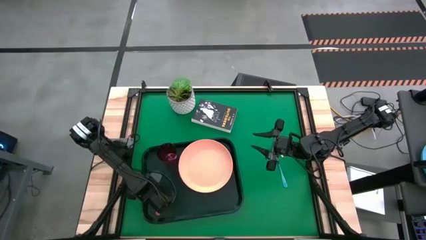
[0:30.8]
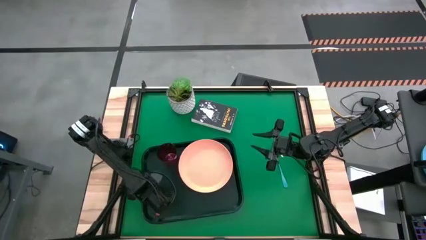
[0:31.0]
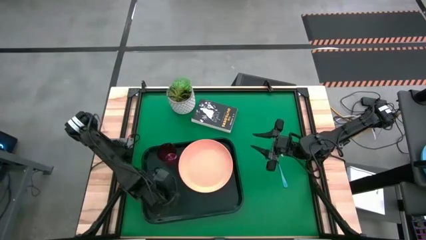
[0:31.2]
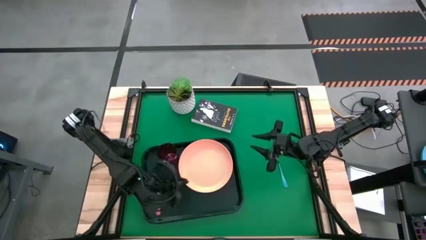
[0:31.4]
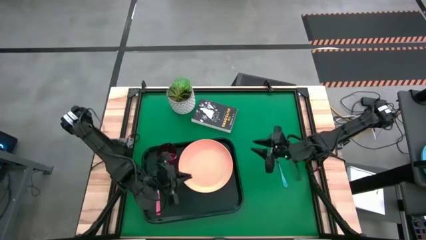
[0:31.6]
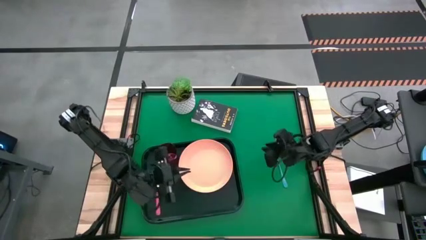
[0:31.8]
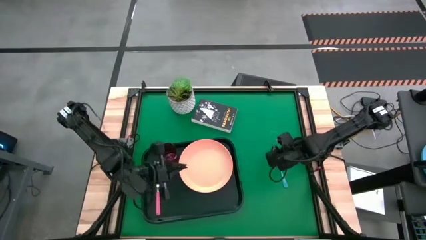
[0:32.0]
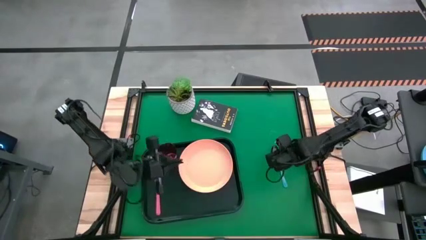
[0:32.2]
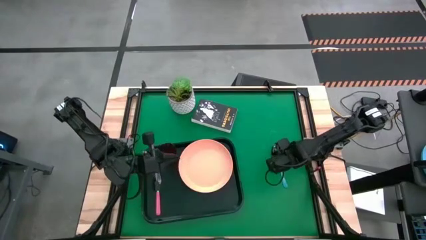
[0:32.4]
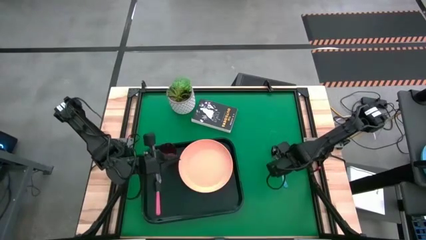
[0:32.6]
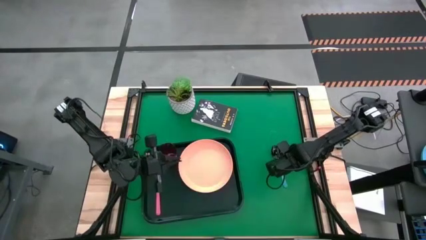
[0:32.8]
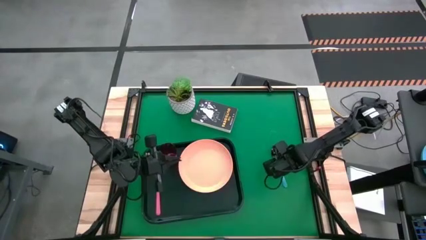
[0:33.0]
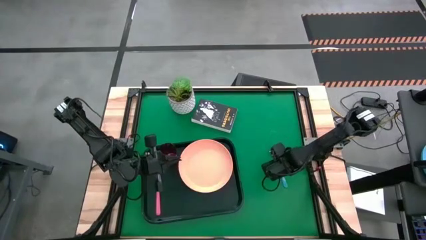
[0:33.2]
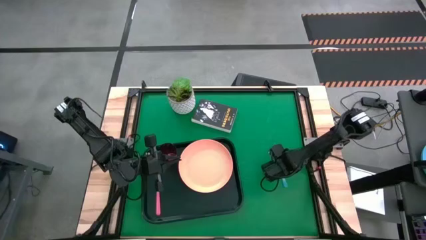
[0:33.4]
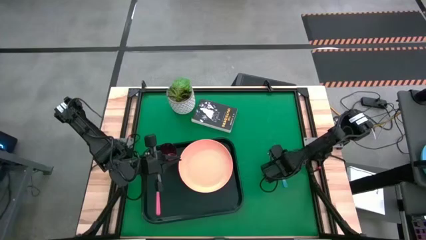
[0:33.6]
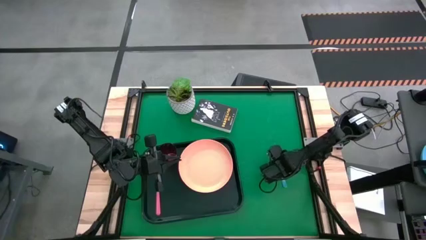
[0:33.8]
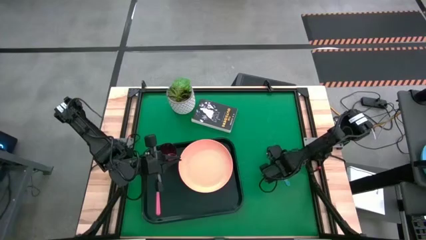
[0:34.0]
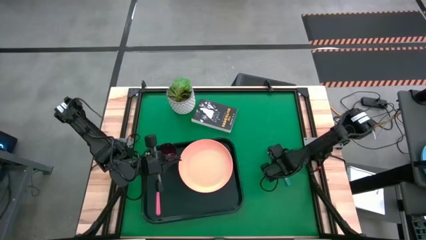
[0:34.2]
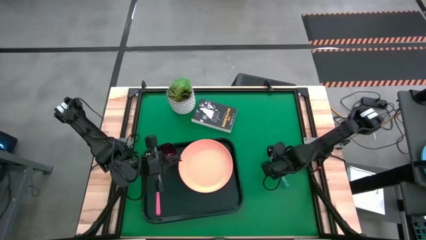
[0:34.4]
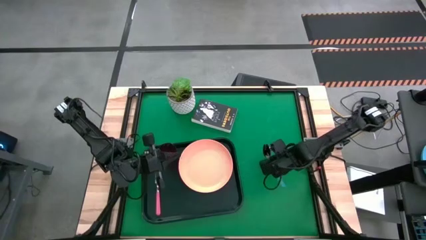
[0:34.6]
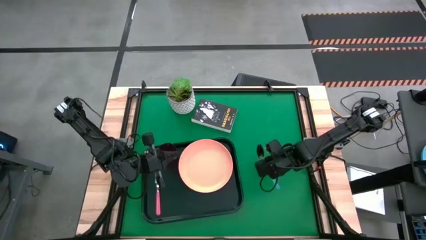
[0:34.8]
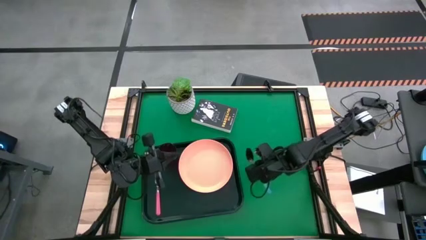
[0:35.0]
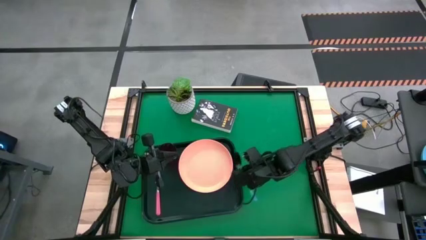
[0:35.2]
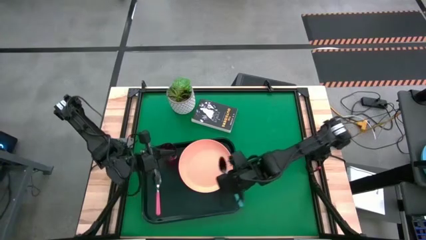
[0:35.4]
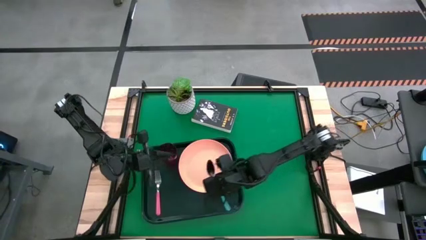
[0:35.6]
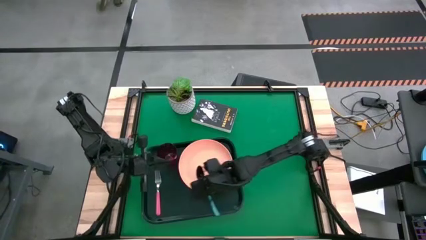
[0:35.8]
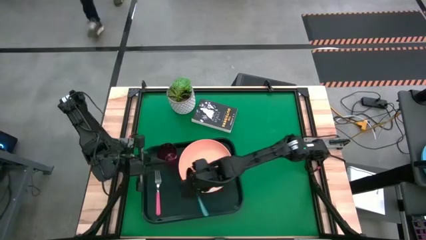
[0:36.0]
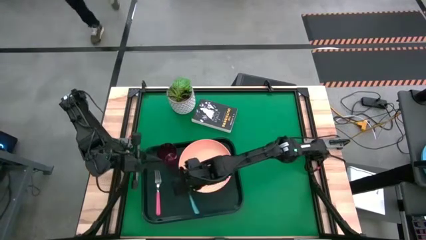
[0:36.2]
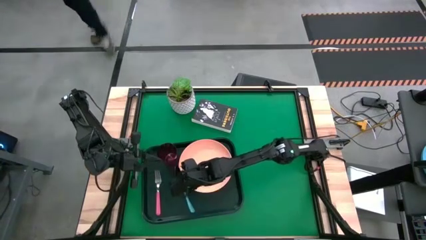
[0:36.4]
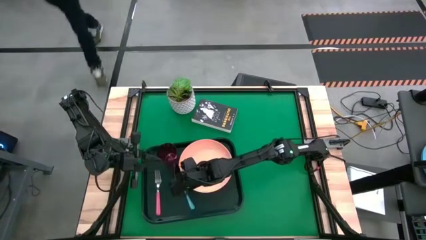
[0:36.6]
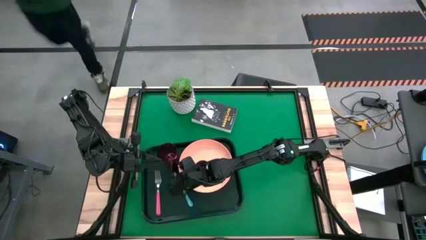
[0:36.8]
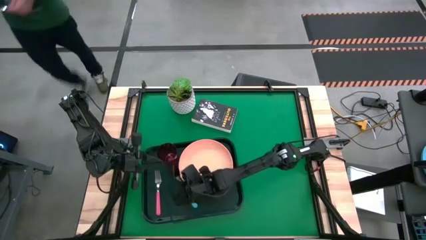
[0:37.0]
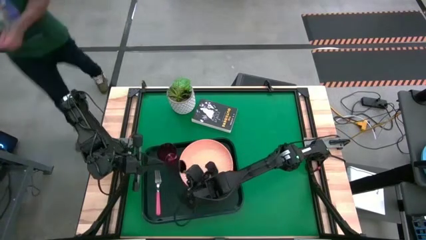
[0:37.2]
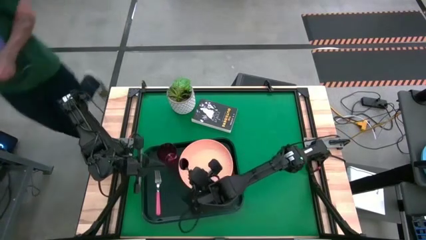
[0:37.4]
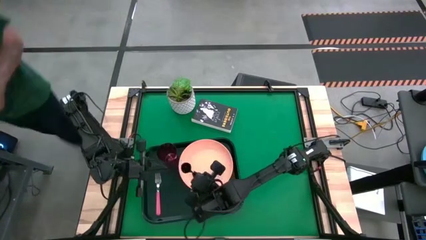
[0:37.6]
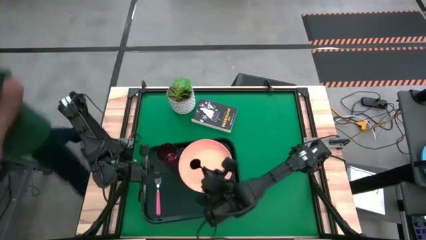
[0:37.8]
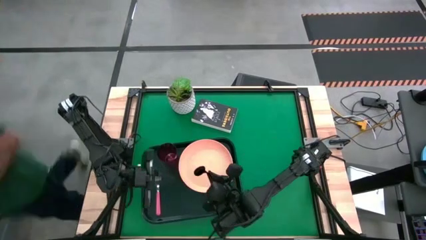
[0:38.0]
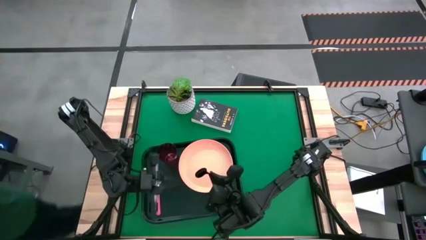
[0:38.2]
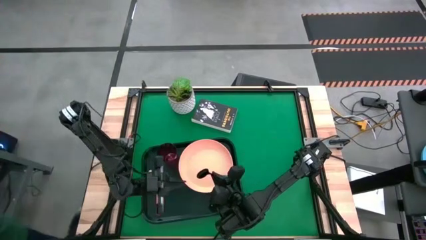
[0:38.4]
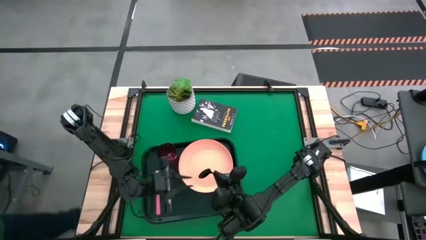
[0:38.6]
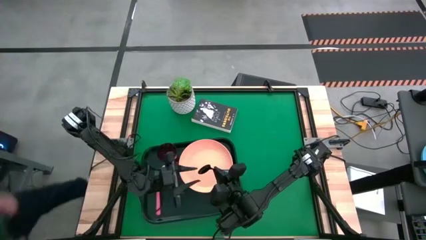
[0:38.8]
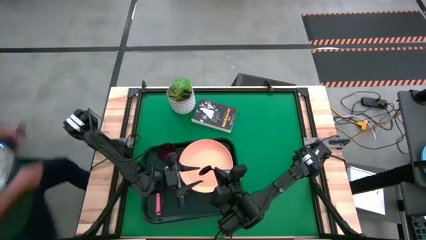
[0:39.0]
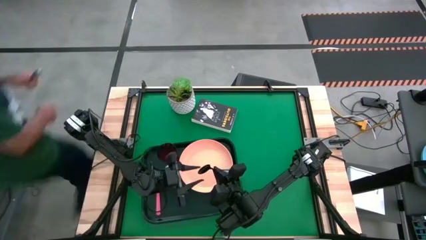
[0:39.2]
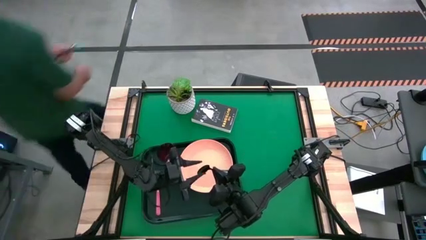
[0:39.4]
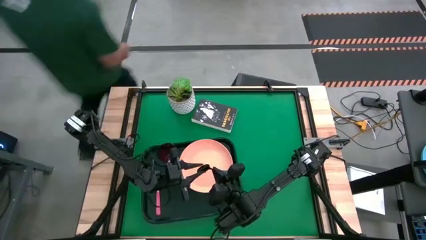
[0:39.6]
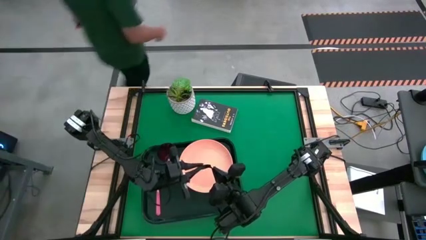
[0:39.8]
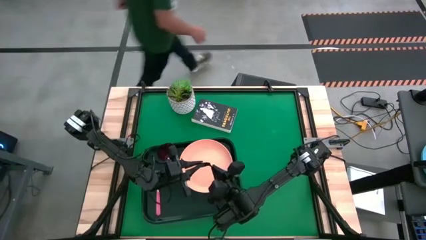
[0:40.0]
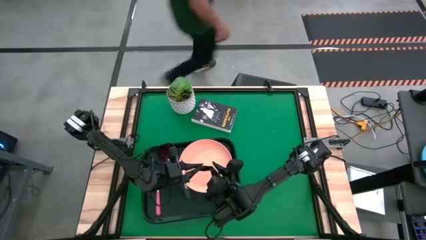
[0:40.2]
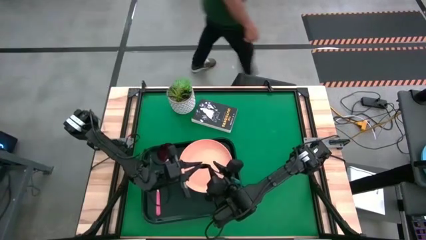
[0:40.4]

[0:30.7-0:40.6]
Task: Pick and place plate/cup/fork/spoon on tray
Put the blue spoon on the black table tray to the right of the pink fork

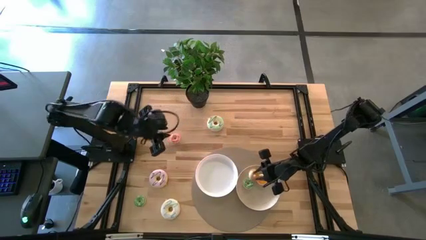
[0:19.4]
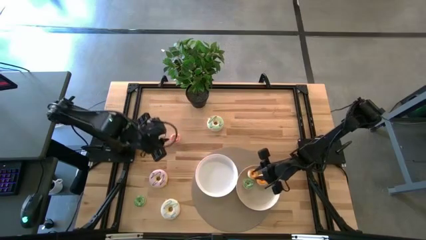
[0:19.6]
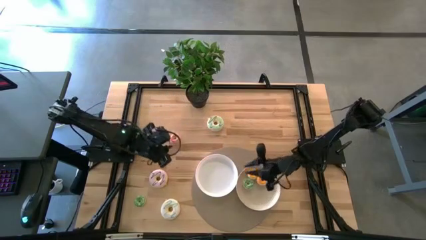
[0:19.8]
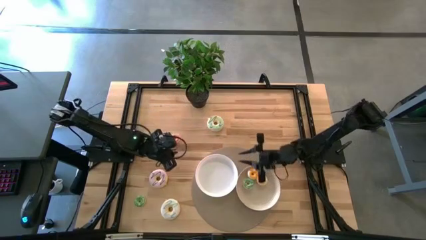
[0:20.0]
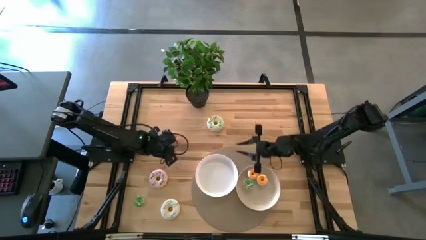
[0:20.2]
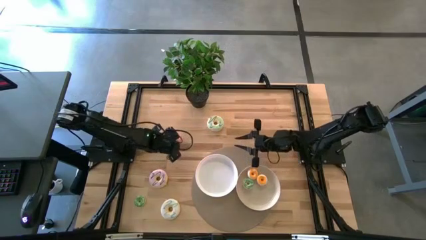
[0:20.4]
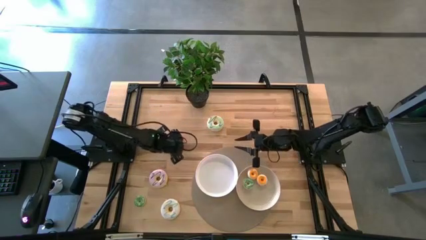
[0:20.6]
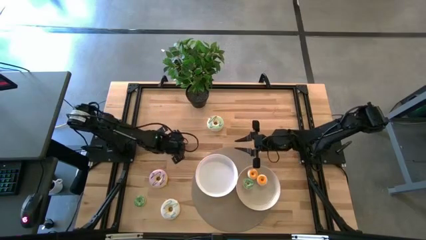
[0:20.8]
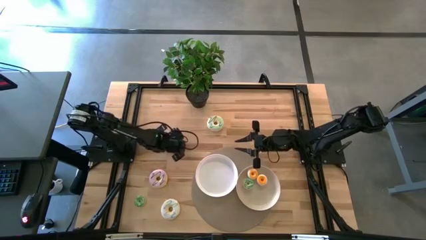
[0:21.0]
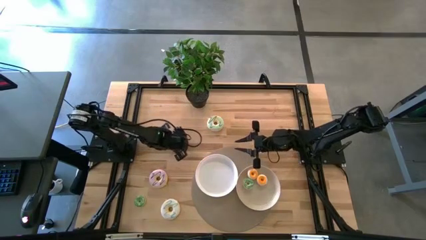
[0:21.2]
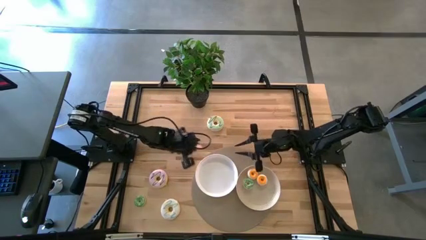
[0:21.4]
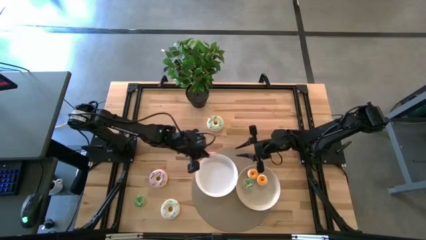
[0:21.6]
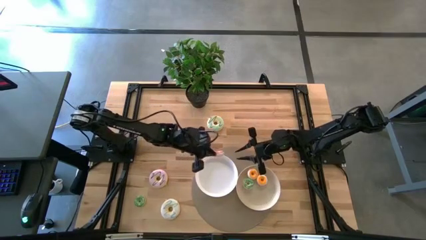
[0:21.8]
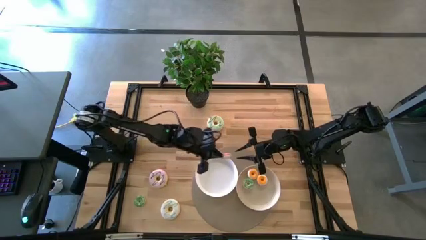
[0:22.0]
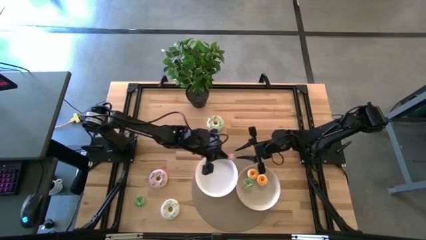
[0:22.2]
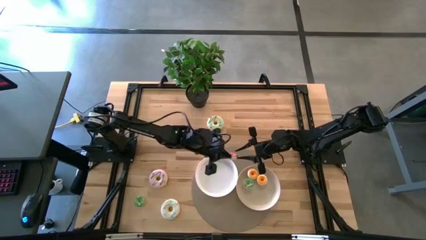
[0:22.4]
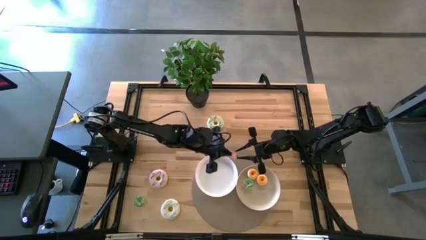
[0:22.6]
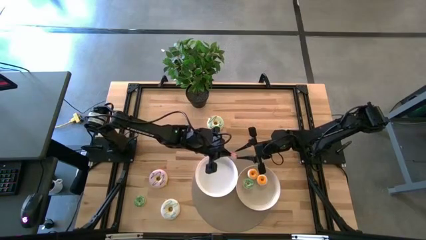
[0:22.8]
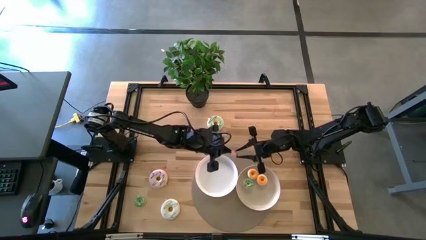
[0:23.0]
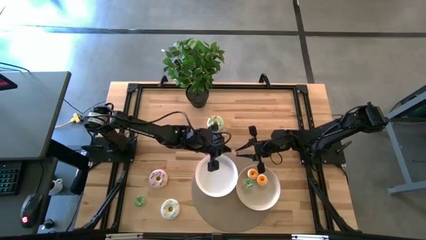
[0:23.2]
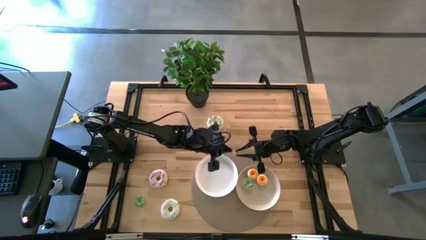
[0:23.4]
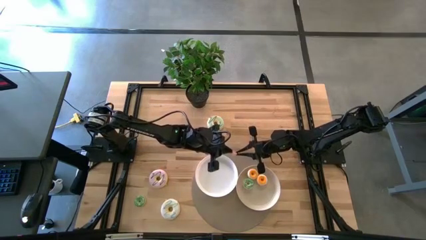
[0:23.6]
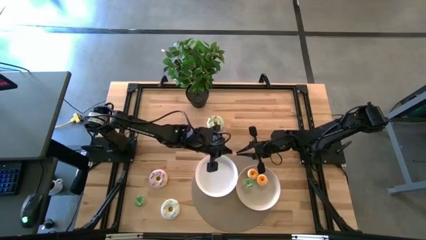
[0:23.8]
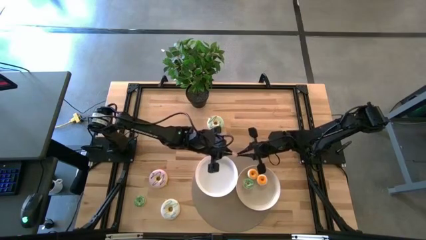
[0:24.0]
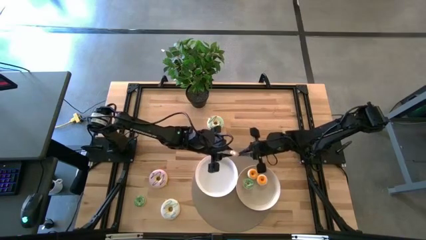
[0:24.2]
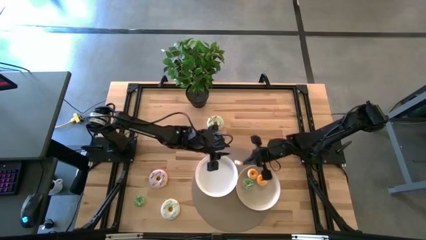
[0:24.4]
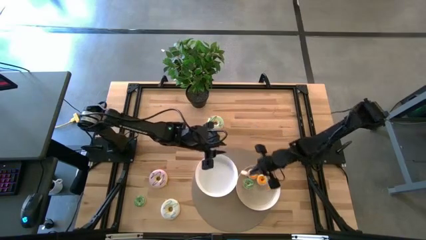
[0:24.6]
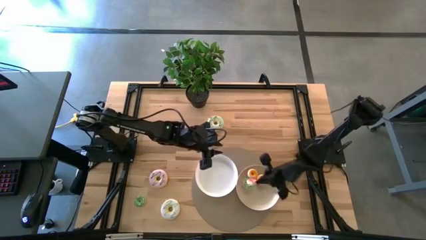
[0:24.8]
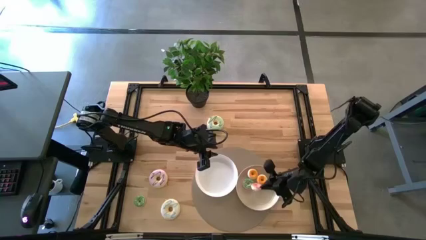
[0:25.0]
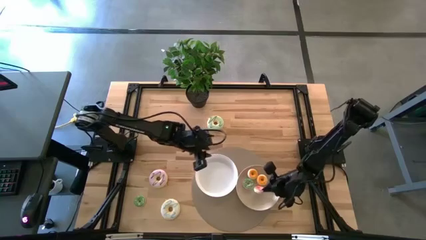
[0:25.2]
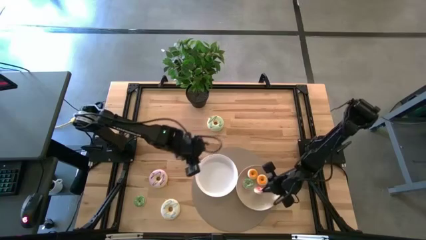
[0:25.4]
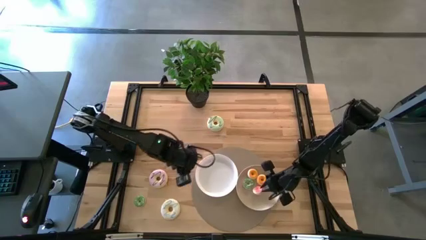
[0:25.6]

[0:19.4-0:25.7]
Task: Pick & Place donuts
Put the small pink doughnut on the gray plate

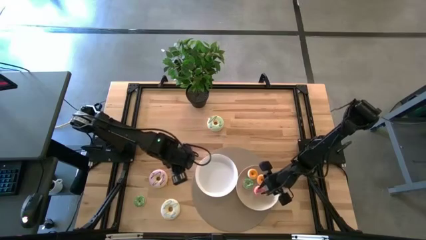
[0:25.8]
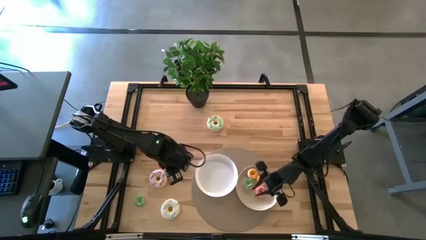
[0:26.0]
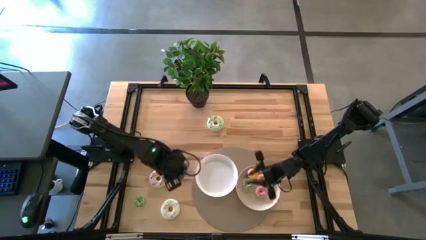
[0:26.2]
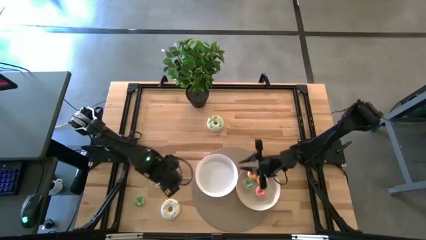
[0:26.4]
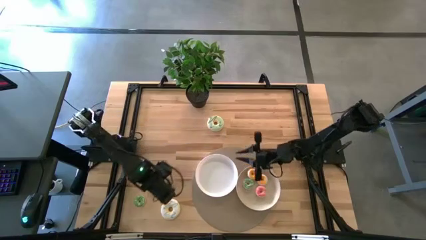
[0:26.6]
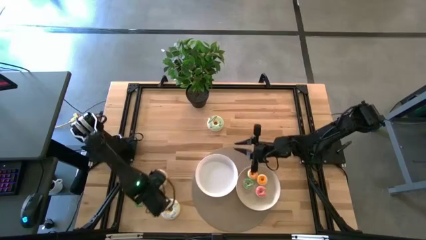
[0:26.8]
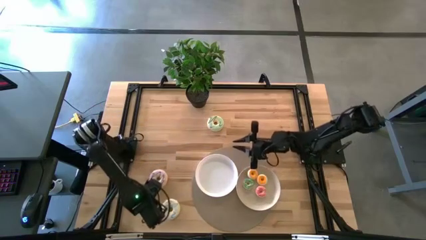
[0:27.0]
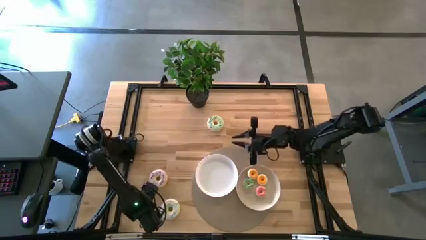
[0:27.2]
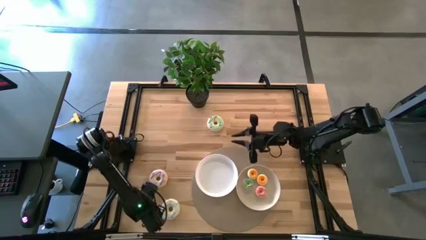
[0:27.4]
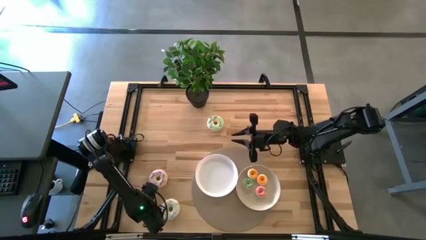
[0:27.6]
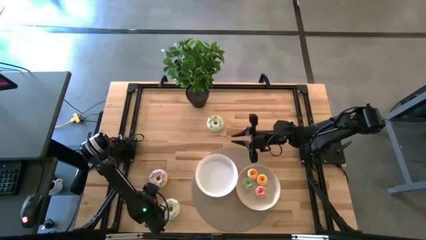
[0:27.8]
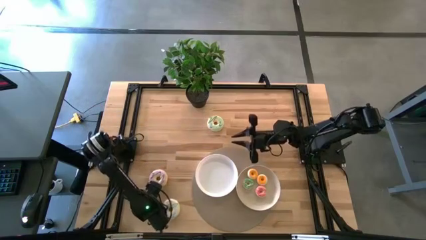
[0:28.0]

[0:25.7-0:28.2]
Put the small green doughnut on the gray plate
